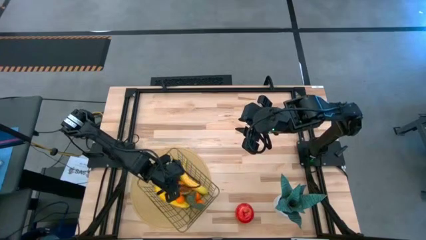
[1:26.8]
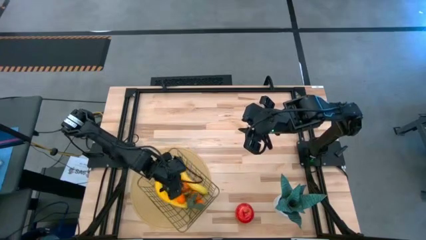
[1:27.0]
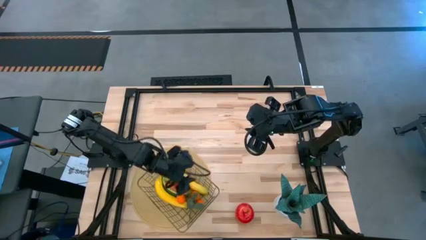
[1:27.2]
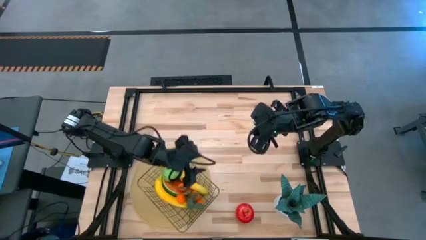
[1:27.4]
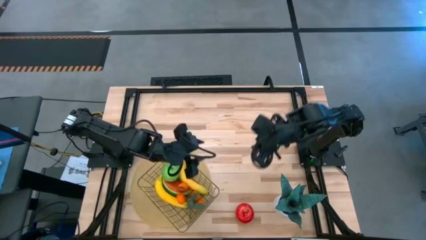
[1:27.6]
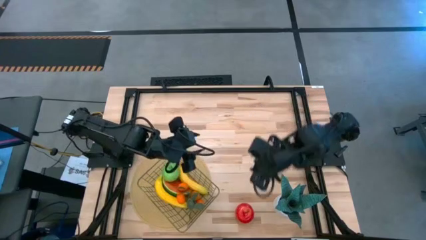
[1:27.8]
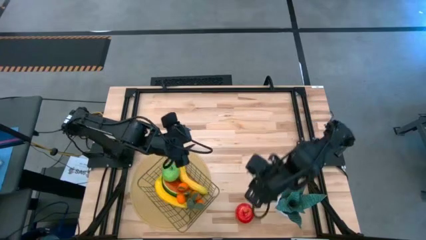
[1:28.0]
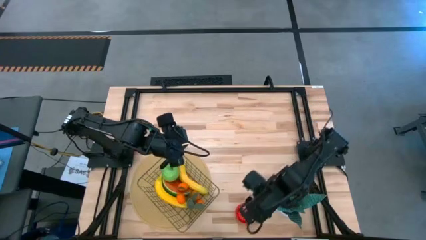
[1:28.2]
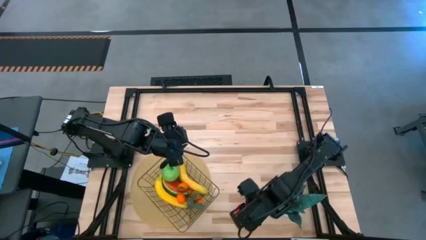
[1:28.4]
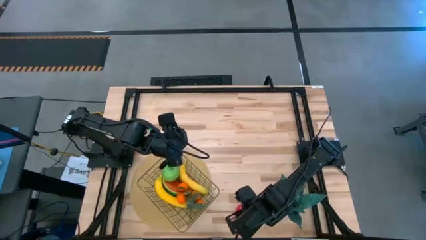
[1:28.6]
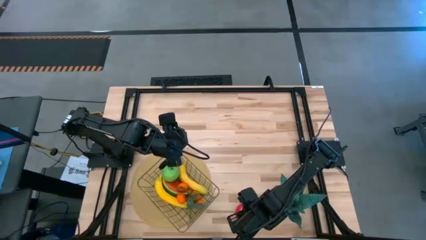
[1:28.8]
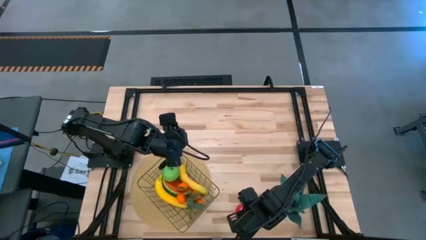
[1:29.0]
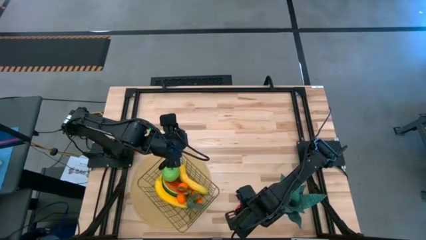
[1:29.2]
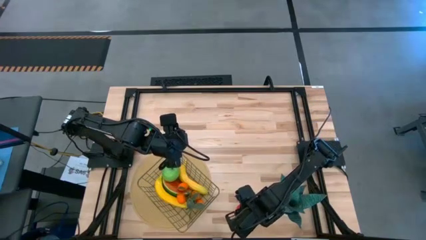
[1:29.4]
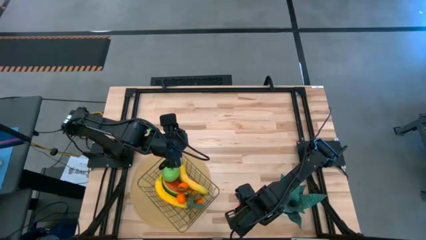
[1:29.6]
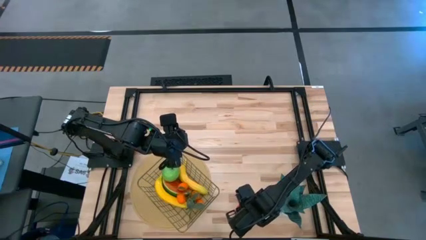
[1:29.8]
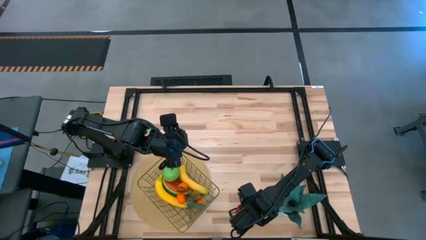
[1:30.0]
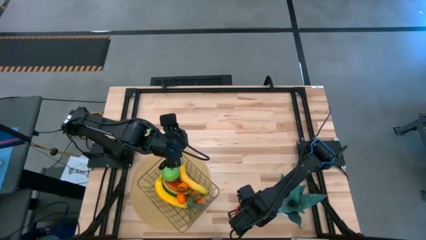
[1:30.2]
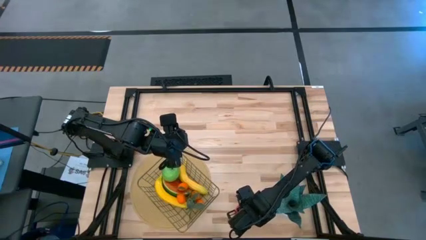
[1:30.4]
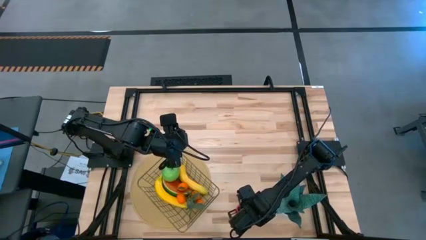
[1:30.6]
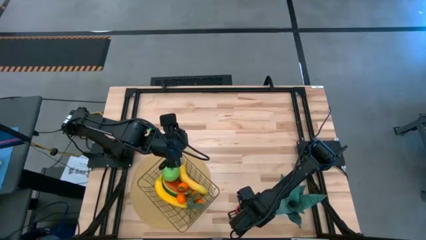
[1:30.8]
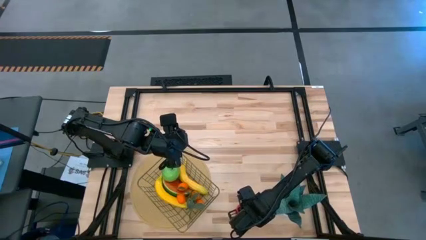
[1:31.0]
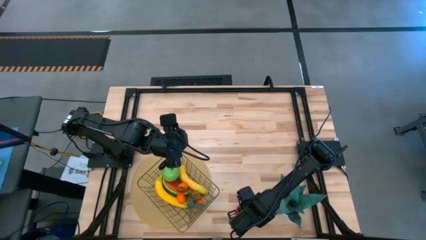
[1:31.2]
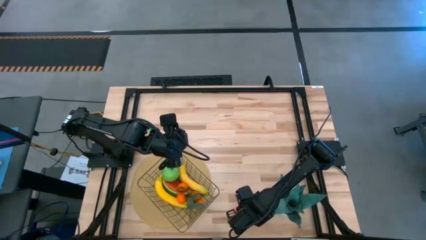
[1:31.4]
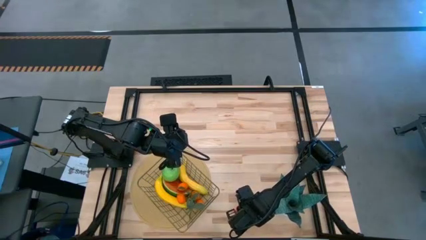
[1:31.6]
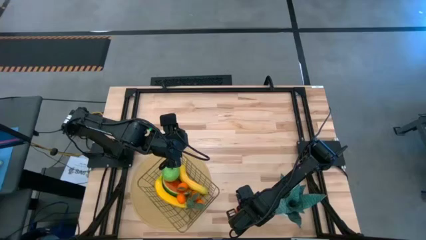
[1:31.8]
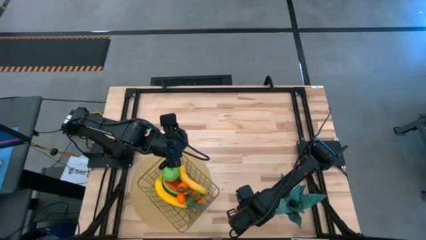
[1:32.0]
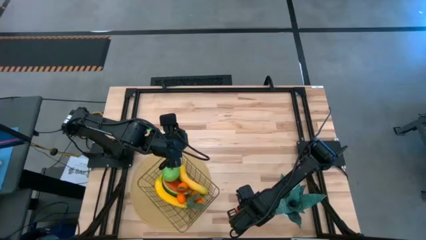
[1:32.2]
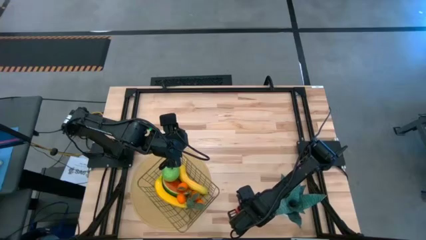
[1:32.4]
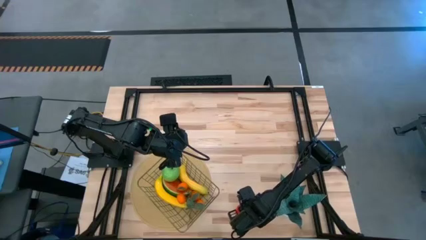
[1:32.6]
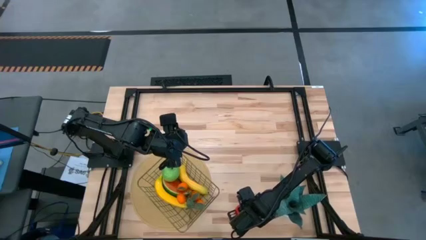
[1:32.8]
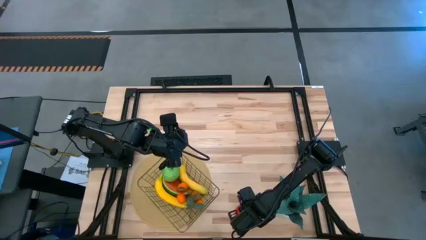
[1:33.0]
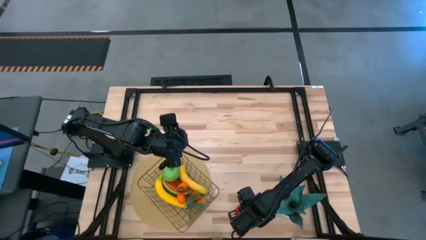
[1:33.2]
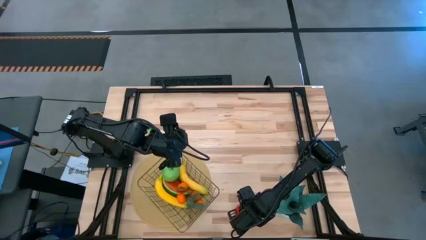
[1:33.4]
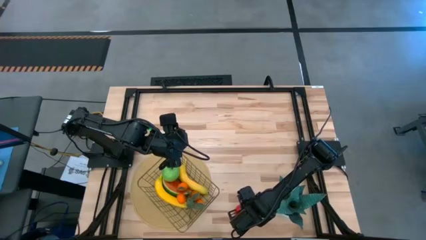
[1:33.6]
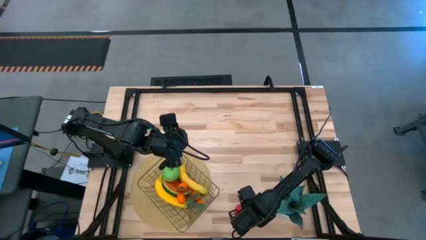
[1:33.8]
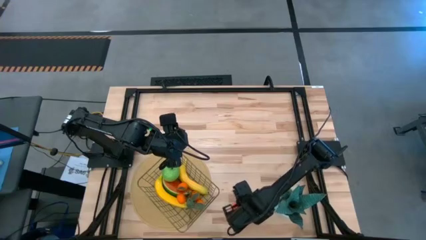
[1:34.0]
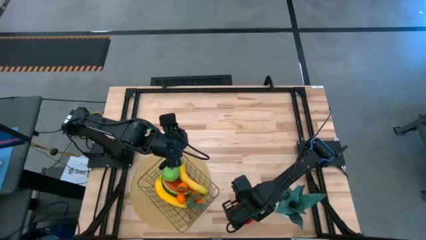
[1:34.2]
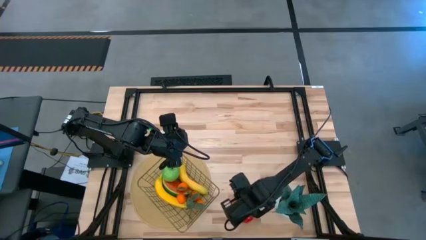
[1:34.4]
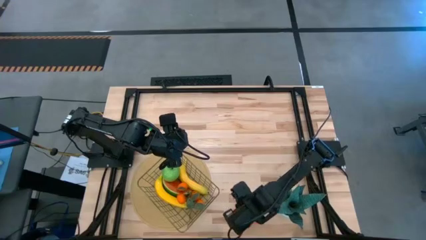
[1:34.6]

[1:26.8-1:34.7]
Task: Build produce basket
Put the red apple into the gold wire basket

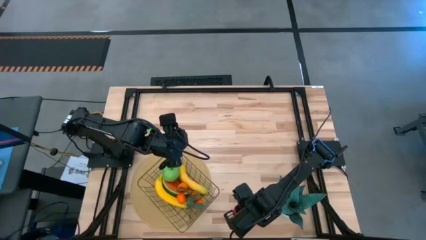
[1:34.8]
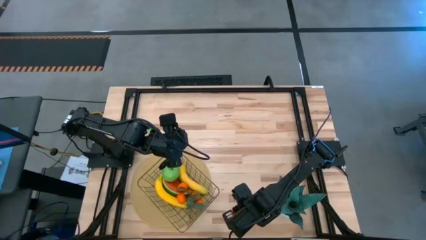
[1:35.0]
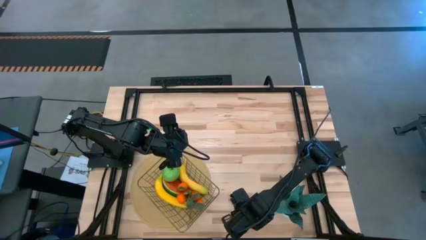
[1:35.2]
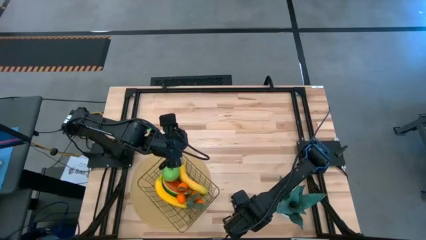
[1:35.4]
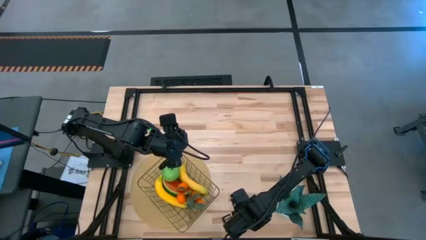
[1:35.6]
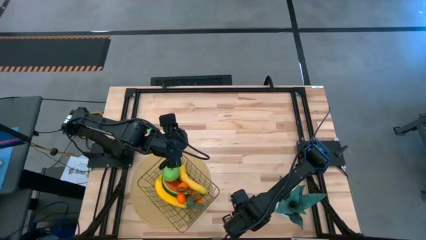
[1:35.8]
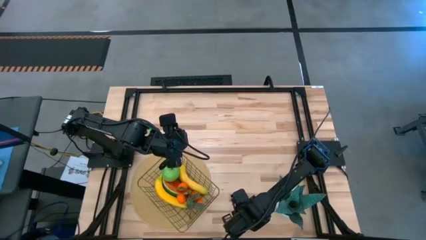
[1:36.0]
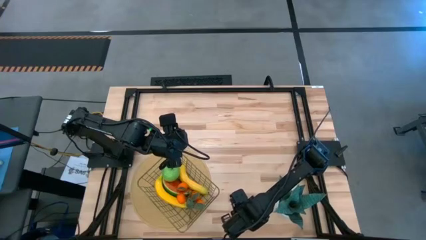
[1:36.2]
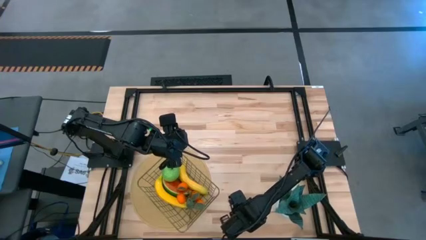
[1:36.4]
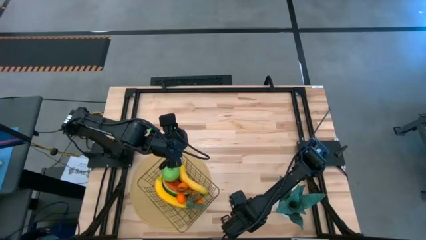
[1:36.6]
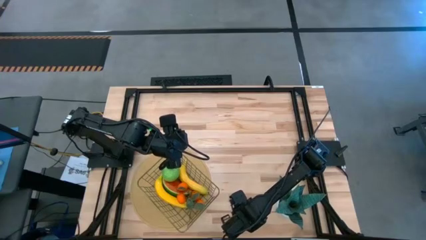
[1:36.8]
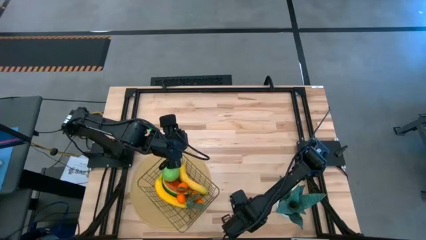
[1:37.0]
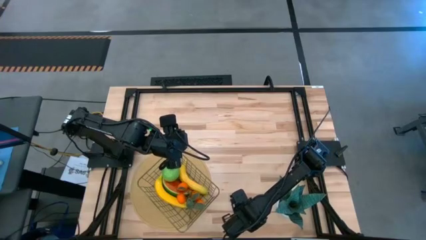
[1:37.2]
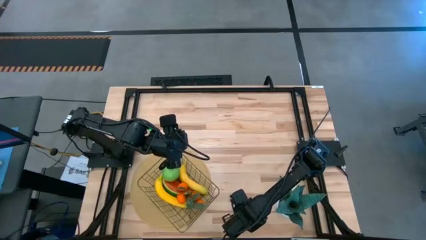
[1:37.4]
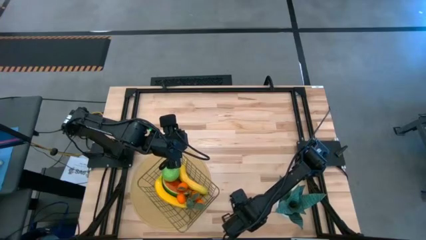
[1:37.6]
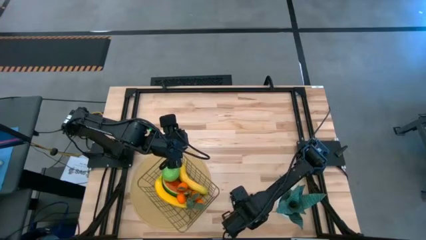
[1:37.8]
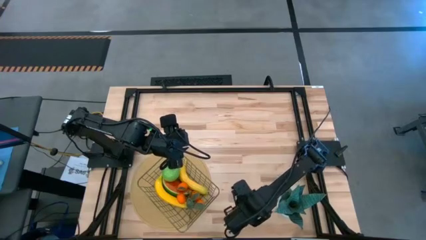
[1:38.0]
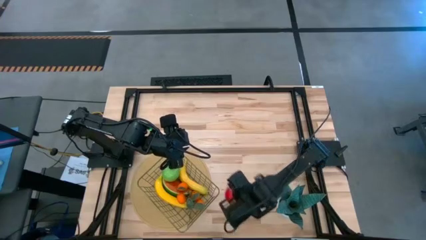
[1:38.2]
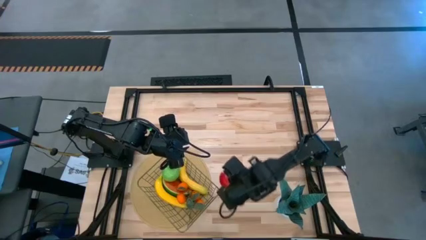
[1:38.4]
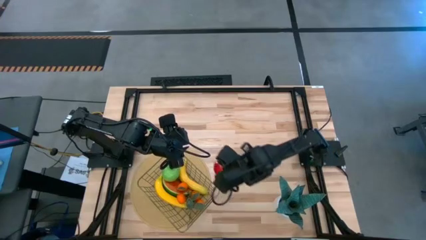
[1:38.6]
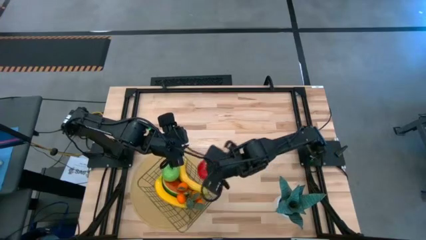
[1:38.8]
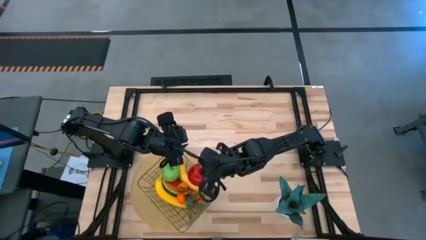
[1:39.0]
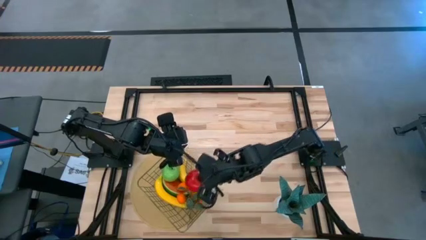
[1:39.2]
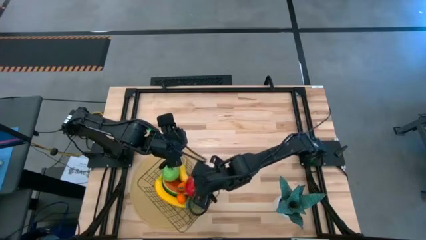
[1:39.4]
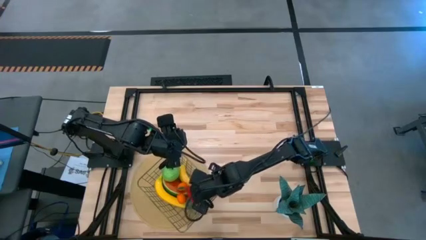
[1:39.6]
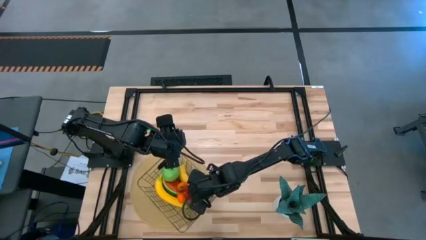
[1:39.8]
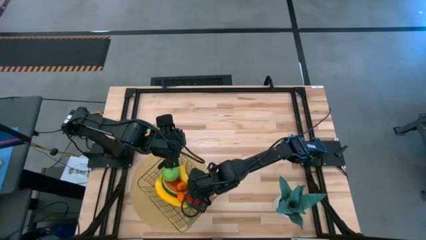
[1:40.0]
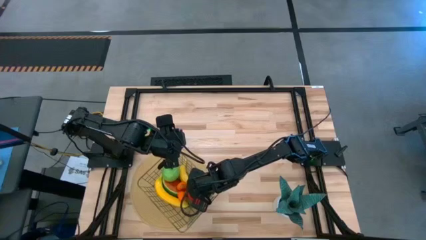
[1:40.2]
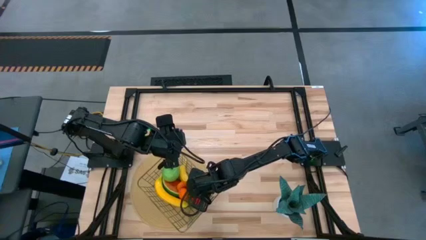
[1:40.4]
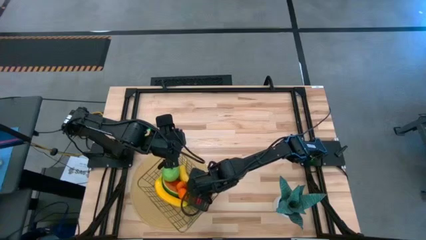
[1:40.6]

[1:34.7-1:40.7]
Put the red apple into the gold wire basket

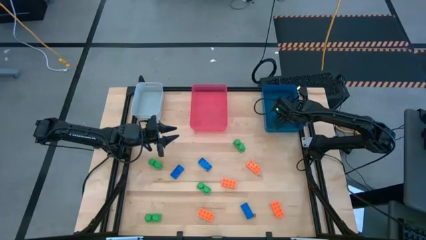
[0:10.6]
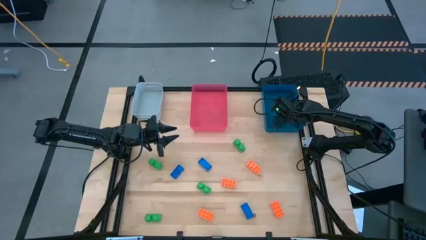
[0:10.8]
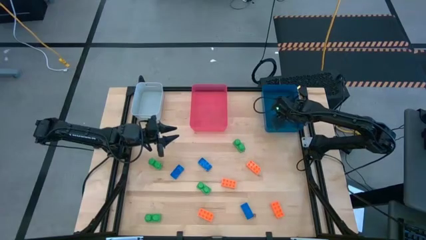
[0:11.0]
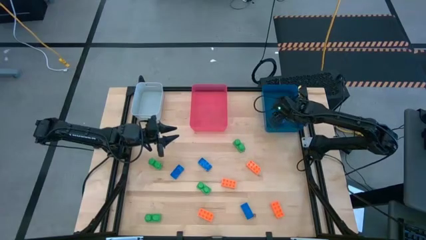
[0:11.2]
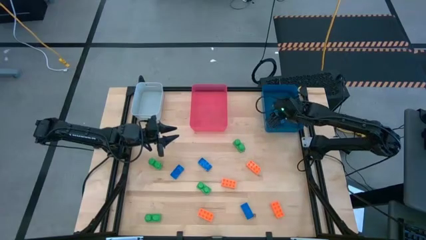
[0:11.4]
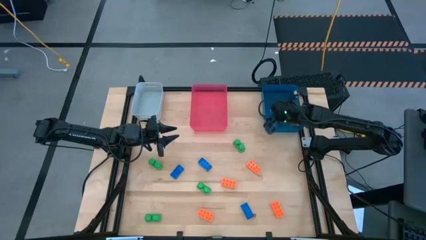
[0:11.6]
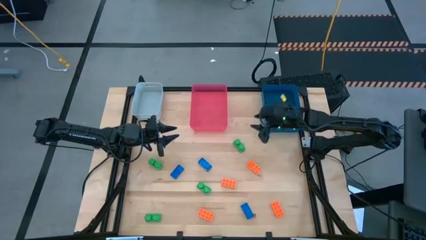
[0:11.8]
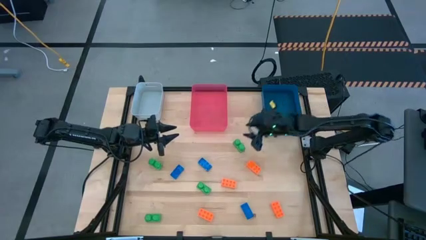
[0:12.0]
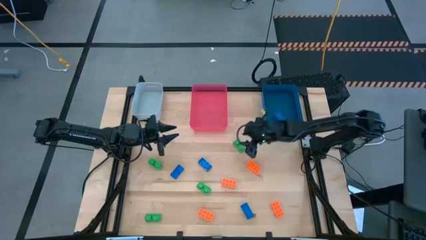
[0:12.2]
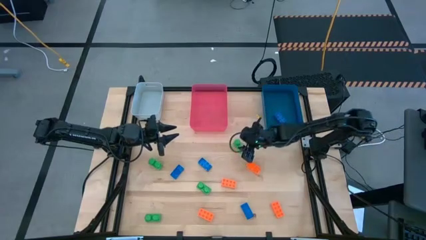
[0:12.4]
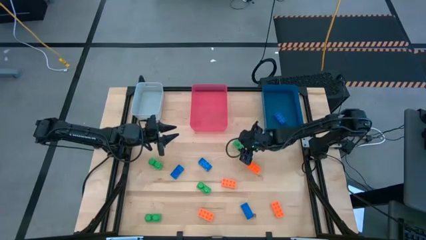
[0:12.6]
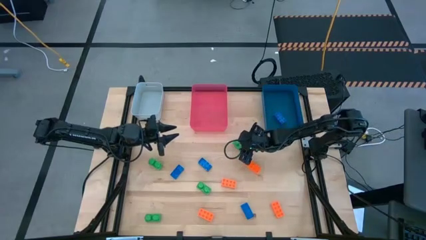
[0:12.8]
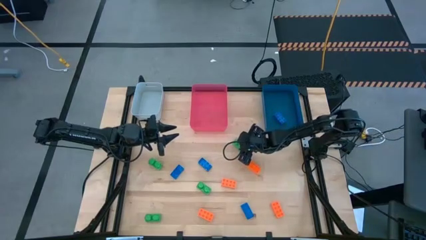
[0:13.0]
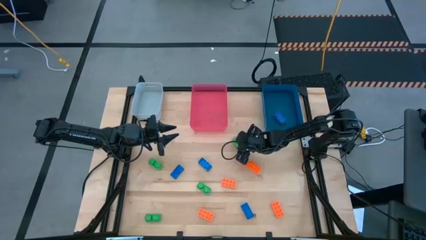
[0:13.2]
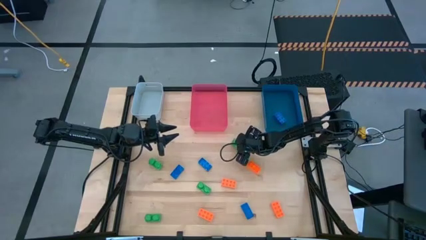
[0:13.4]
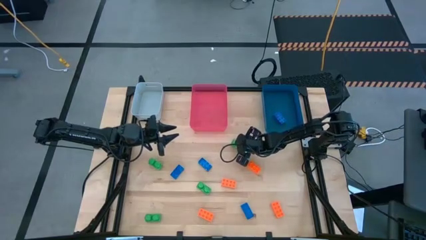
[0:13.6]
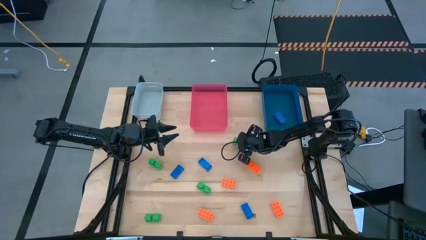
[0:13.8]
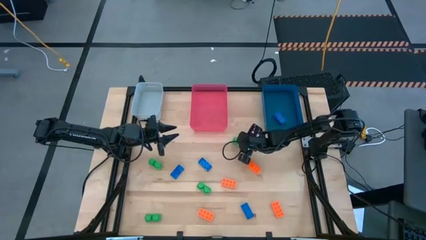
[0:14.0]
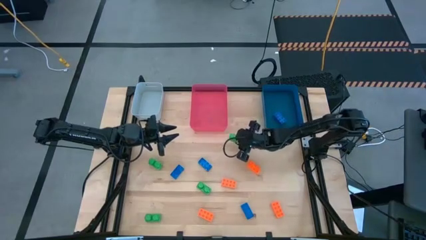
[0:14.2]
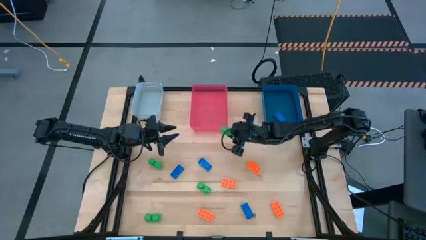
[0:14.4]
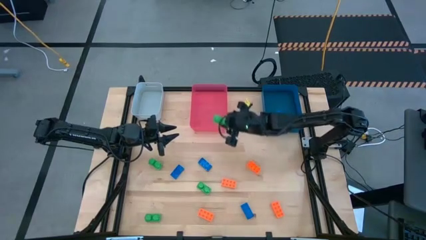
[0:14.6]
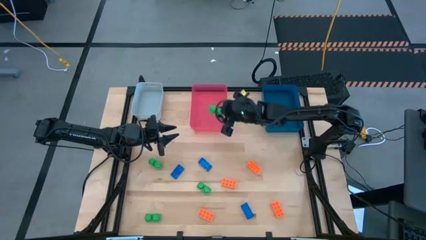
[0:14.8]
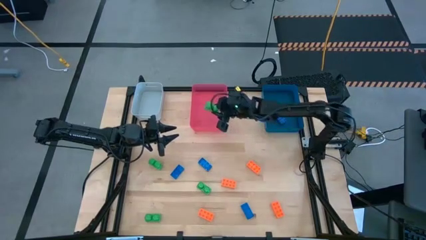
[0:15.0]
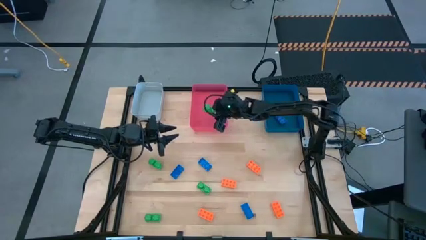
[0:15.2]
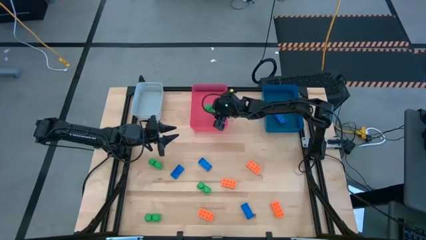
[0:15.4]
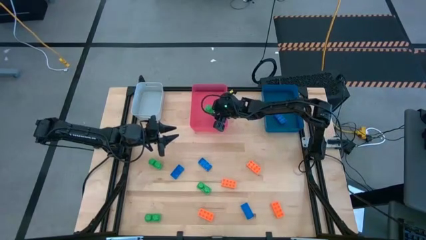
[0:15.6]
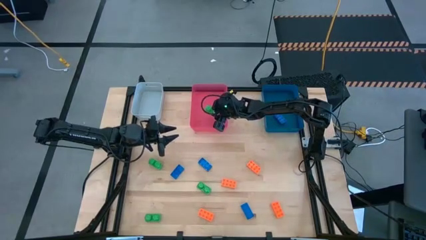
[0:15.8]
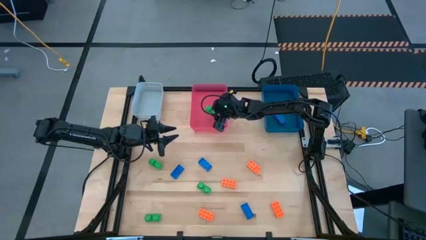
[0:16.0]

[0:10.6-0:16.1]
Task: Sort & place blocks by color
Put the green game piece into the pink bin
